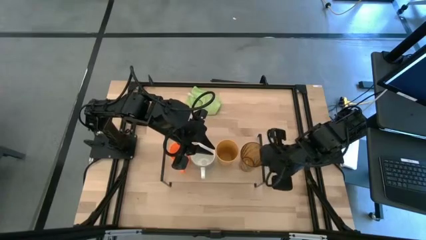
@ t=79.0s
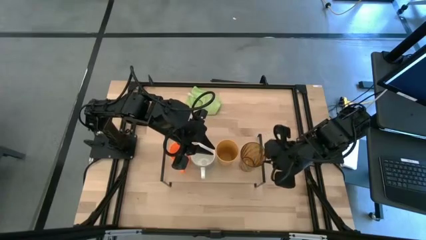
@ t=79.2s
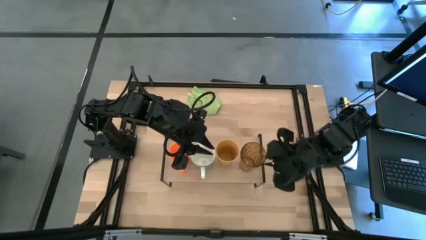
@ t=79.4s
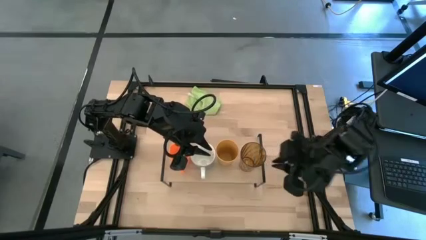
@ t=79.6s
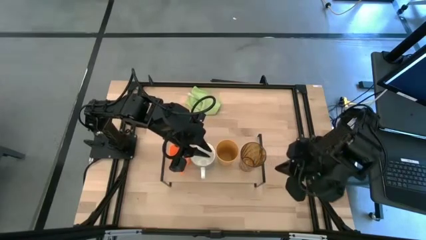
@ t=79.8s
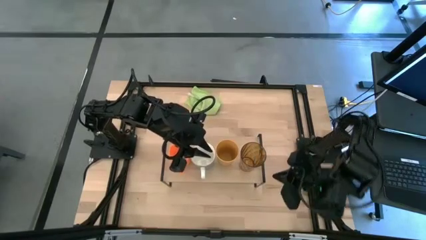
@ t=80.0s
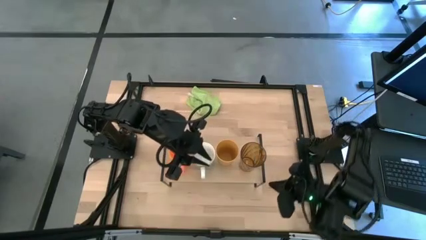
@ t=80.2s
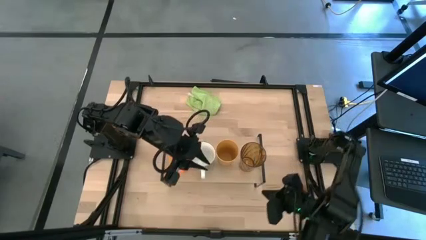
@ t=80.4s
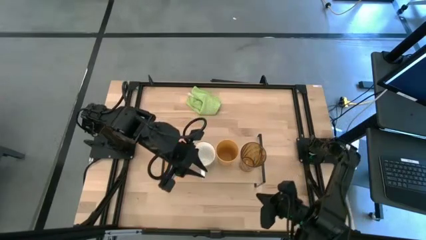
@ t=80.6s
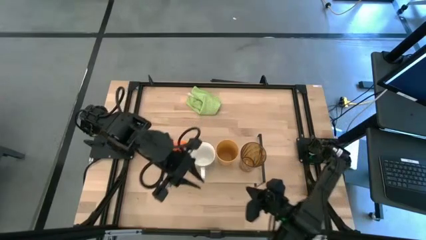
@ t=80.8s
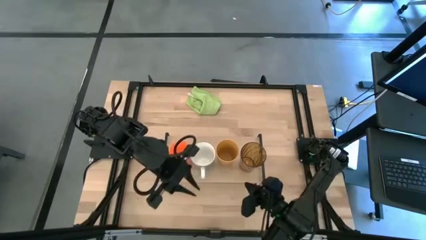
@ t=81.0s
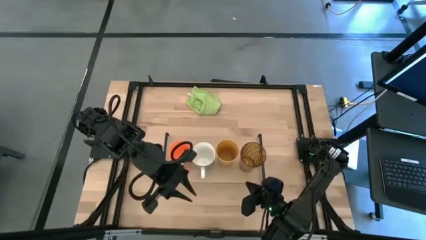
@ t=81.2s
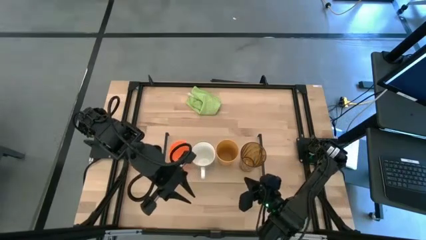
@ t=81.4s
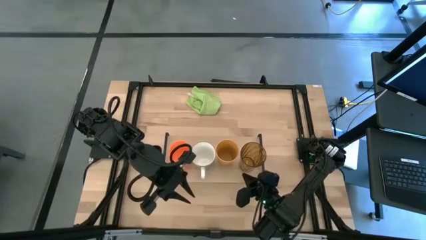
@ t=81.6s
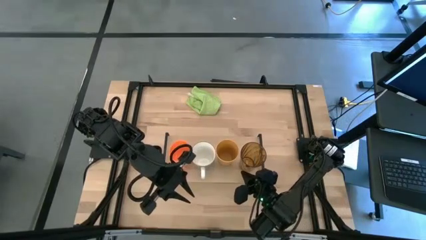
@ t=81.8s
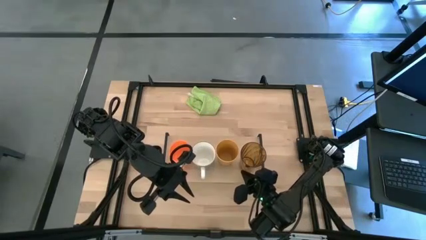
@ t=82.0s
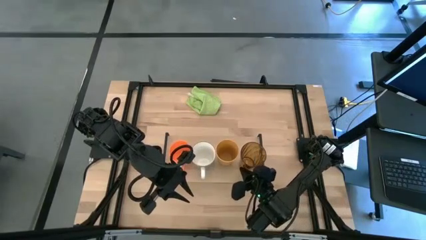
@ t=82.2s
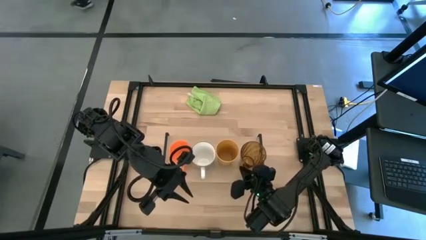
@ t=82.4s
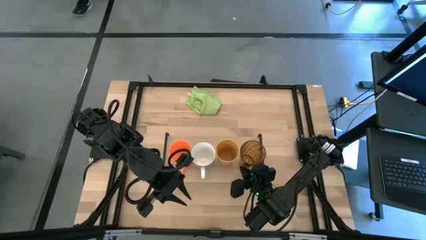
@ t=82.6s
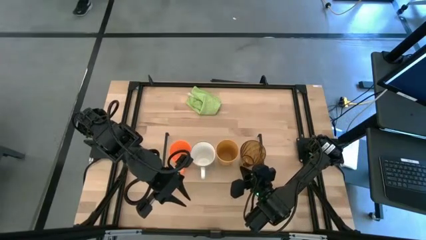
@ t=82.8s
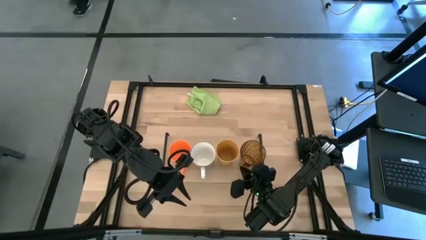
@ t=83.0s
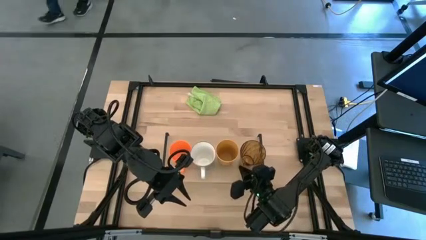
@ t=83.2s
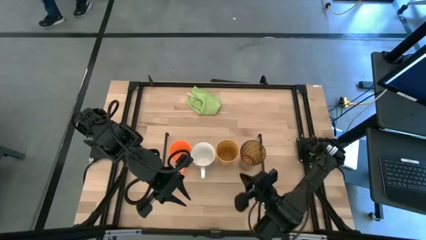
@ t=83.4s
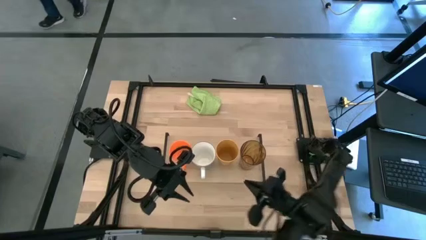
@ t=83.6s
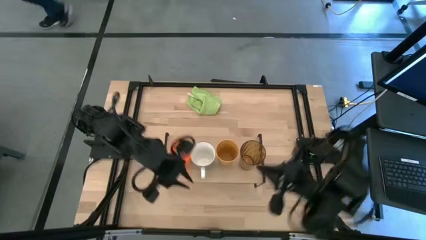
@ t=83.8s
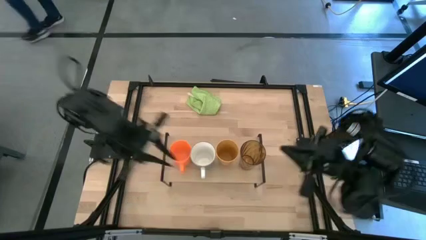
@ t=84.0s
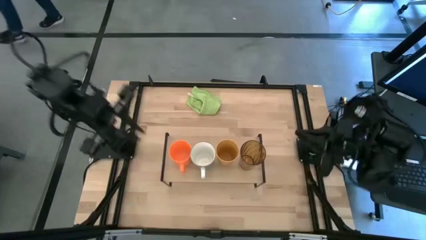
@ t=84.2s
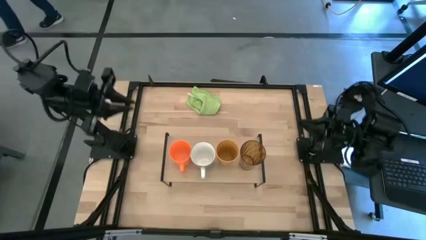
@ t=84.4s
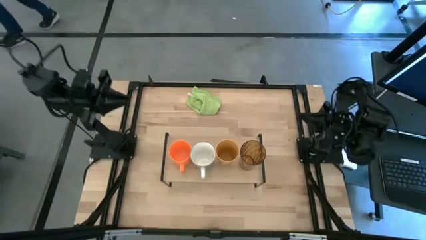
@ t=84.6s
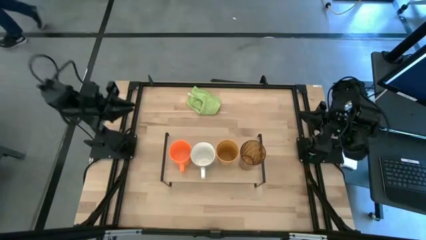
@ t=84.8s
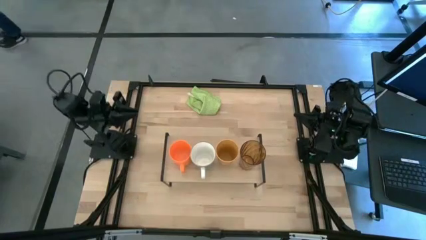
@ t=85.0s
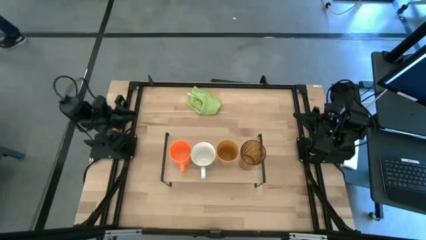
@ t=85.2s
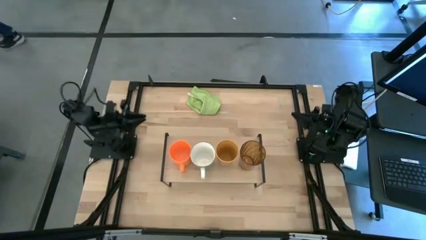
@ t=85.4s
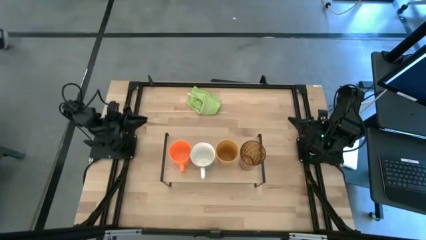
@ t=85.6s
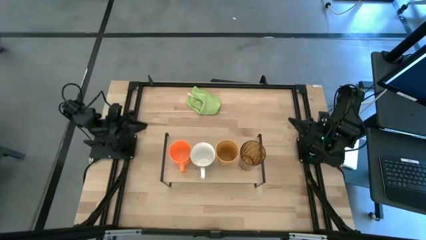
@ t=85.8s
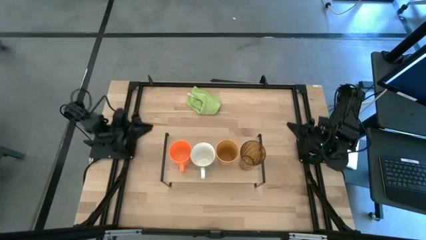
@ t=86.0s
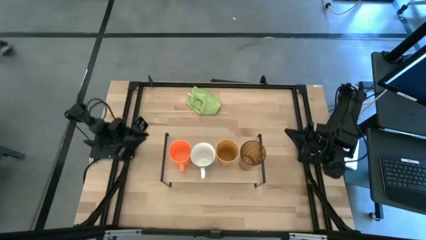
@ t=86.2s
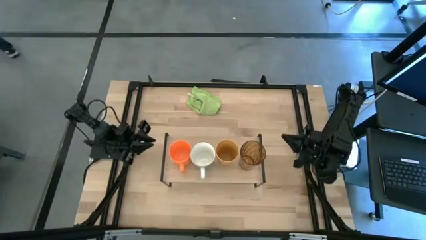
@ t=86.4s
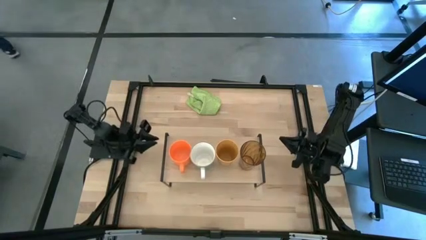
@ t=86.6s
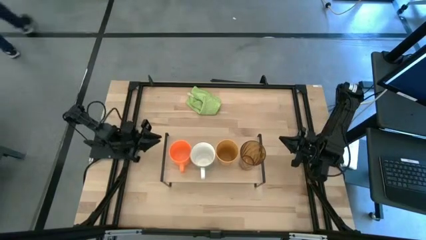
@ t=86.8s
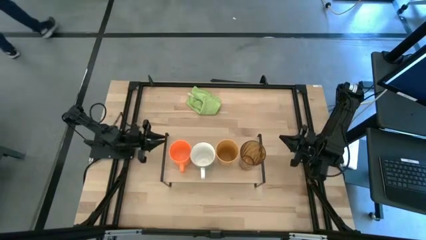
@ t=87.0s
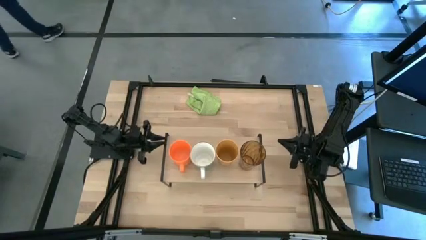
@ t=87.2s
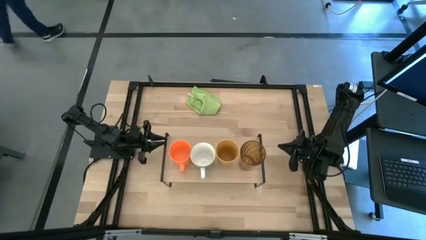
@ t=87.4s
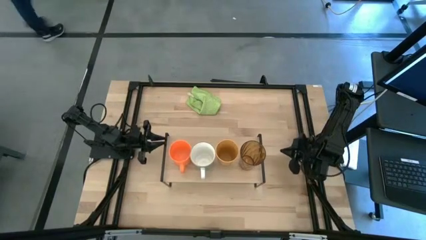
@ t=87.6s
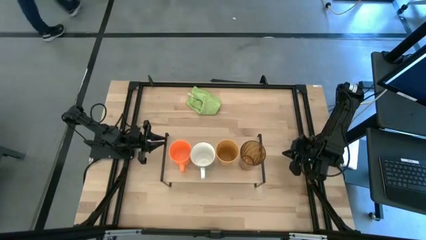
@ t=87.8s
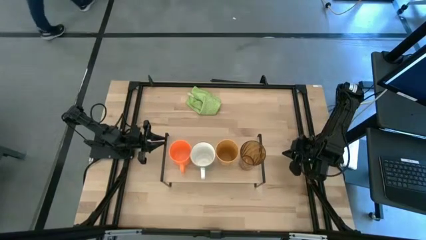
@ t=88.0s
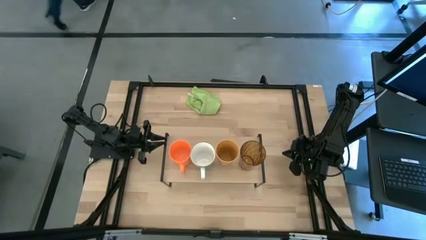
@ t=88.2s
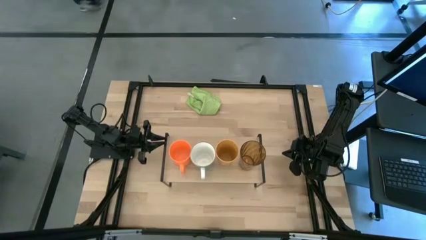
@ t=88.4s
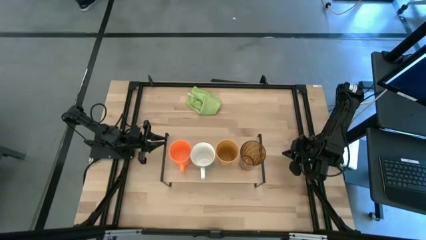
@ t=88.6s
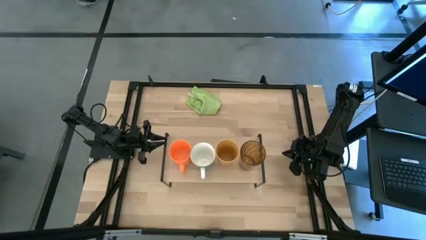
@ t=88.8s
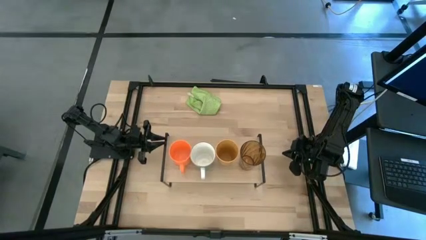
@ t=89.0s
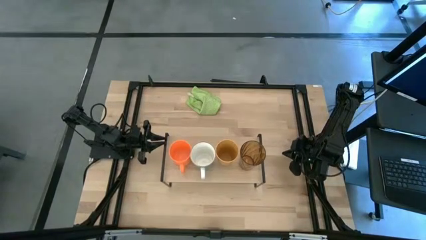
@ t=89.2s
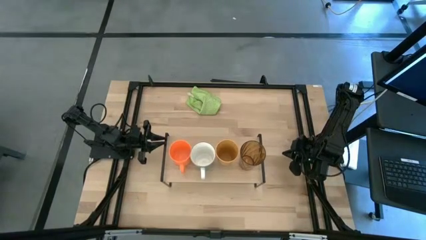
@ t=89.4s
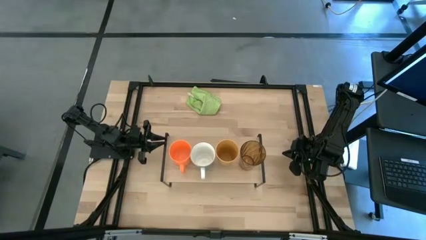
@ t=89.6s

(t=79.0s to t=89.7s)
Task: Stack small to large cups/mugs on shelf
Return to Home Position

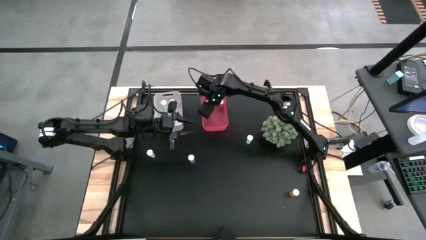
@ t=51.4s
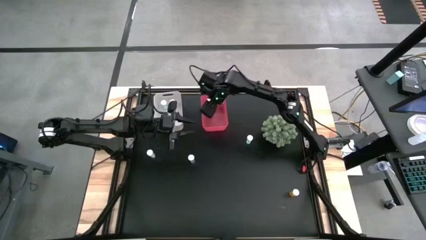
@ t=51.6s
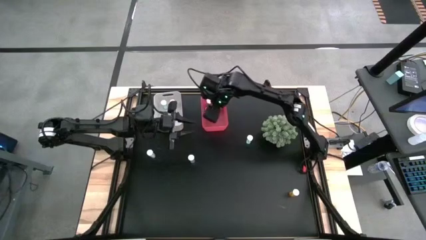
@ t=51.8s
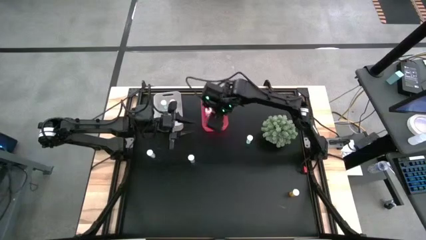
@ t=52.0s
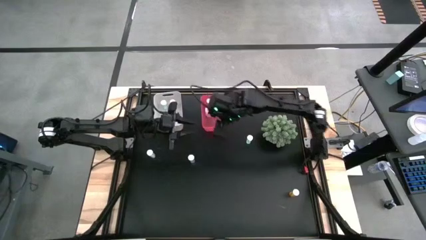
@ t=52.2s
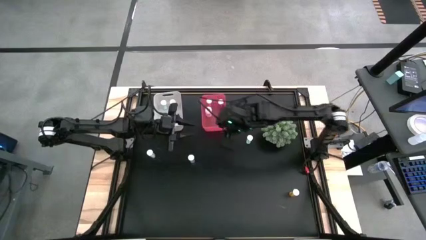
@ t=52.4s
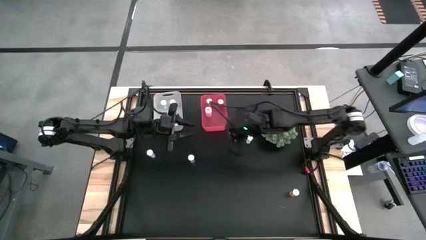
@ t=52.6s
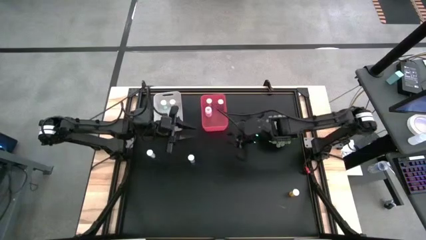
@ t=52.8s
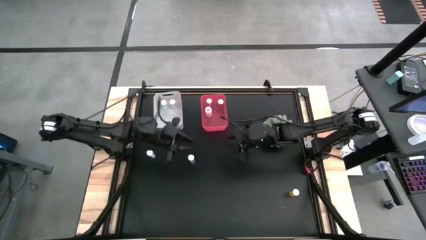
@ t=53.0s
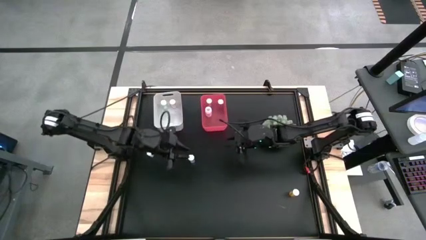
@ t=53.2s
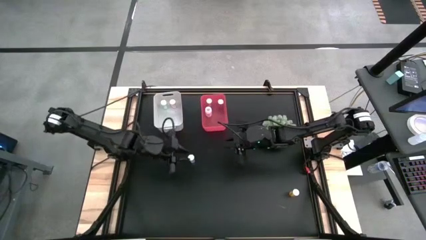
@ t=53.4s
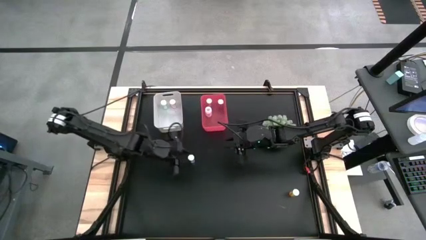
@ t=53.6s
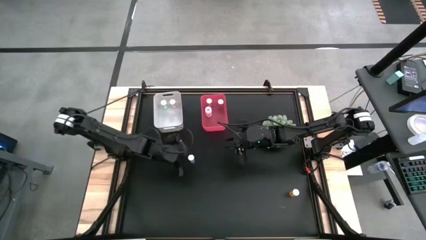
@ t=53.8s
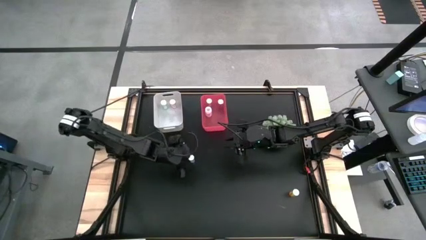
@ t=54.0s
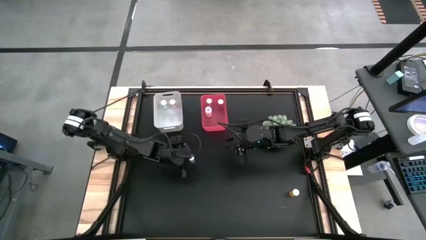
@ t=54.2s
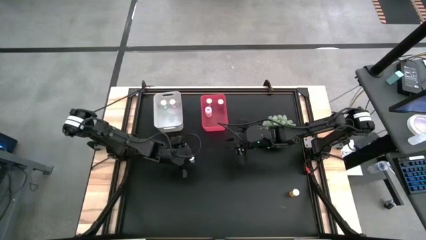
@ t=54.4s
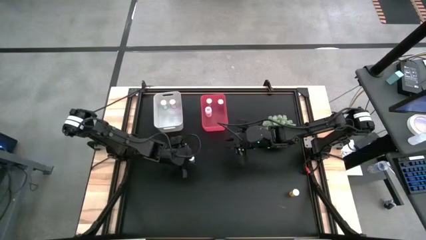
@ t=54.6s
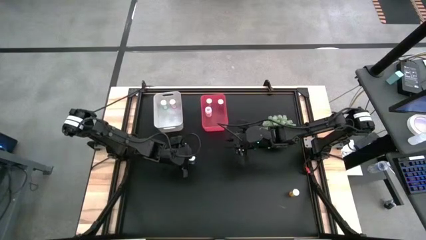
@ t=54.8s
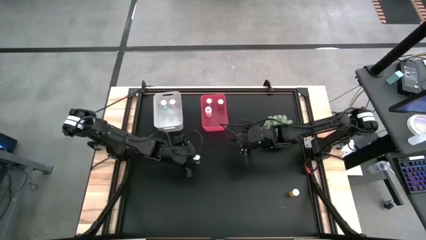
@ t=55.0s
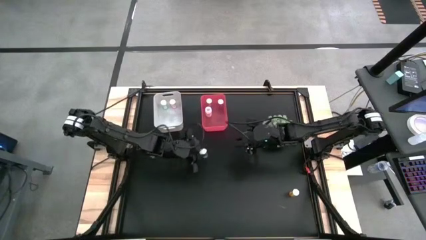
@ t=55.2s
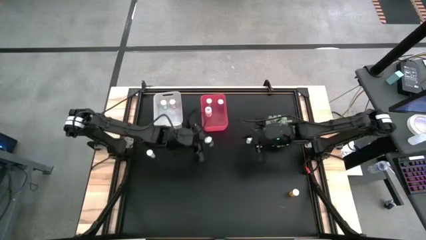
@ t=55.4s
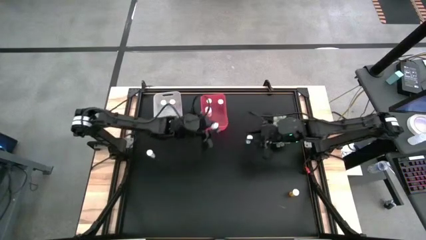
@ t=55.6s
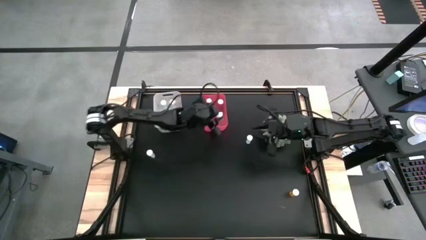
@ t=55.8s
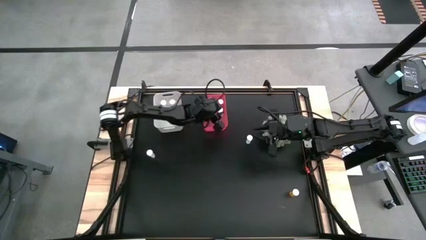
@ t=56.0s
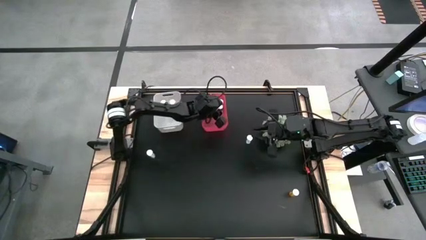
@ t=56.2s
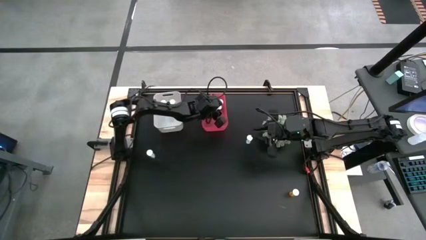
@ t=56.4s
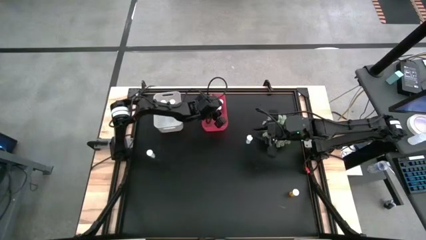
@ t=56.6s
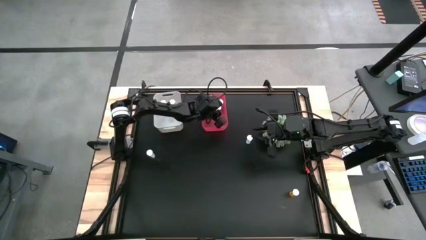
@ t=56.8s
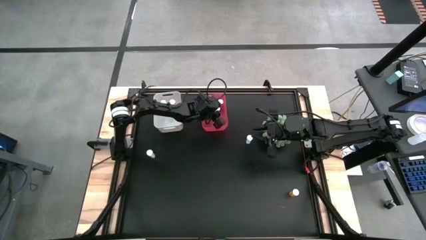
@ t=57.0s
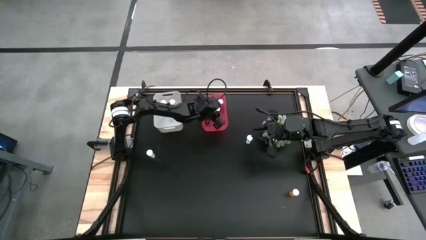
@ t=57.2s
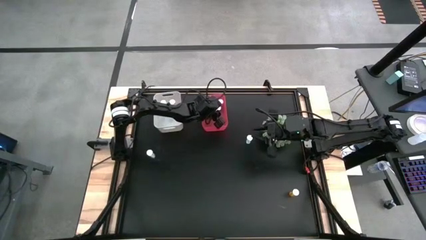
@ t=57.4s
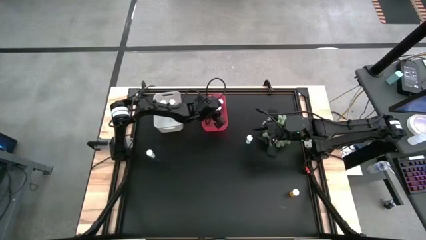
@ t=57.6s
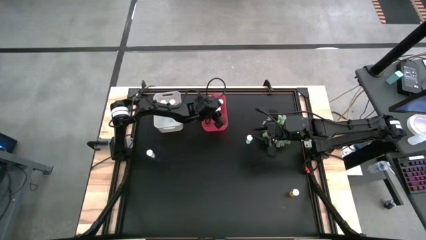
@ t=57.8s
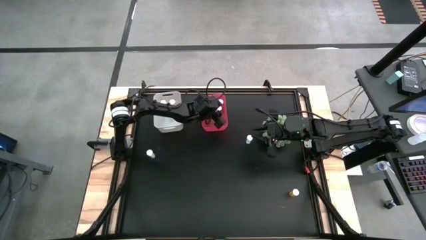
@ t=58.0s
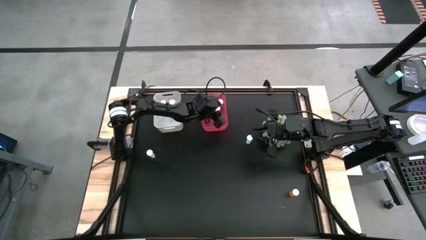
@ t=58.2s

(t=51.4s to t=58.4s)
Task: Pick and place medicine bottles into bin by pill shape (circle, oval)
Put the blue capsule bottle into the pink bin
